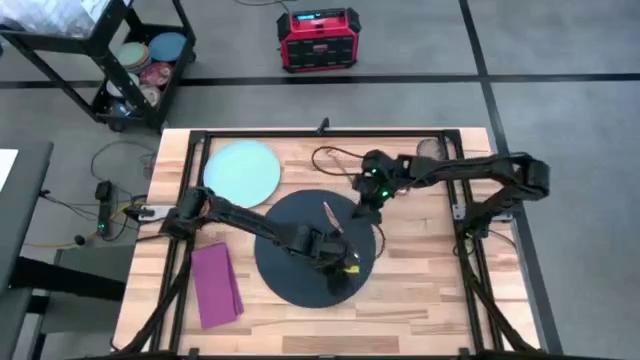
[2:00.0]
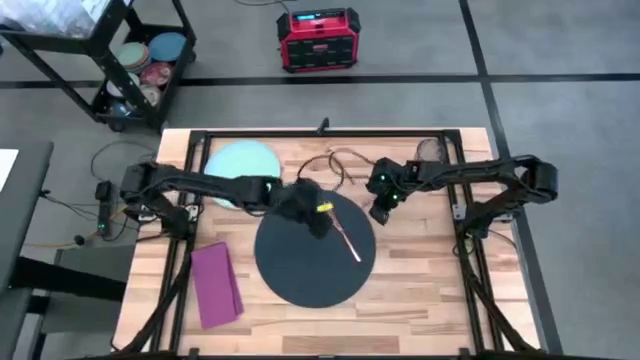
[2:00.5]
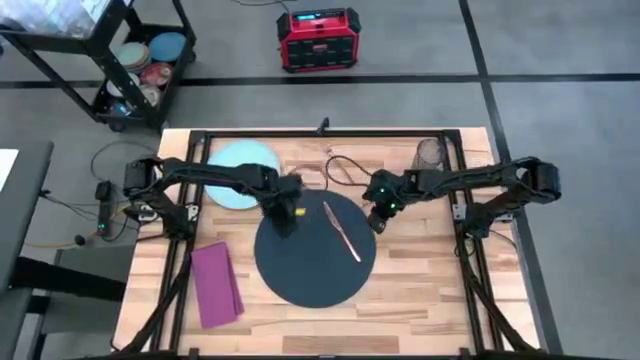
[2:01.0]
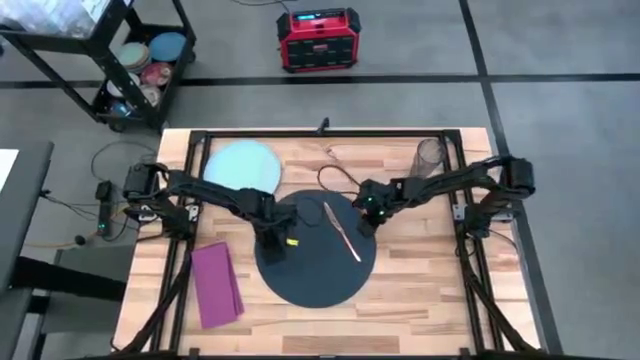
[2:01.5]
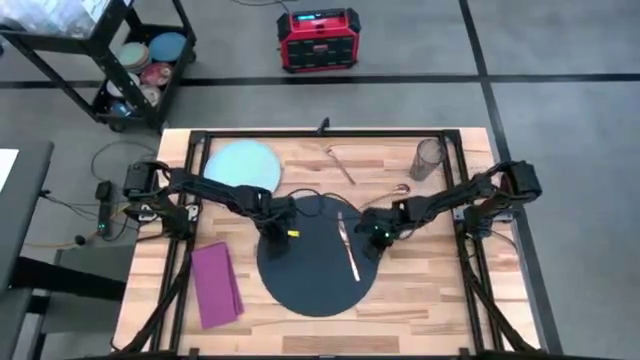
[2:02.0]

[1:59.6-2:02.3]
Task: Set table place
Adjust the blue table mat on the table

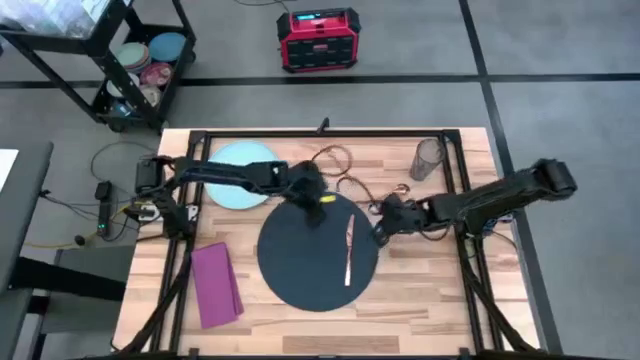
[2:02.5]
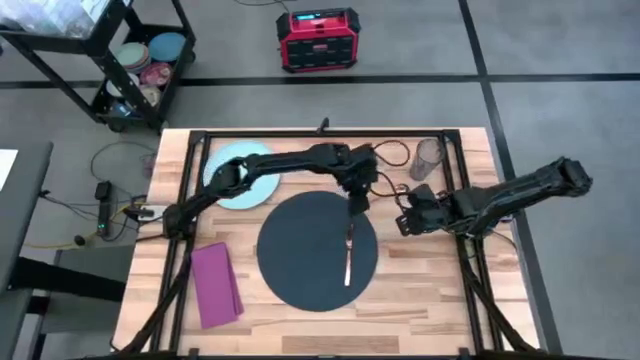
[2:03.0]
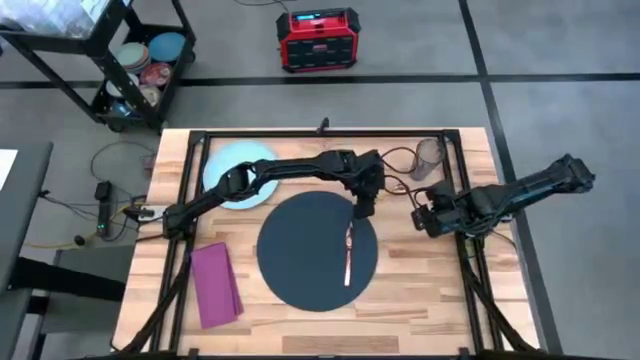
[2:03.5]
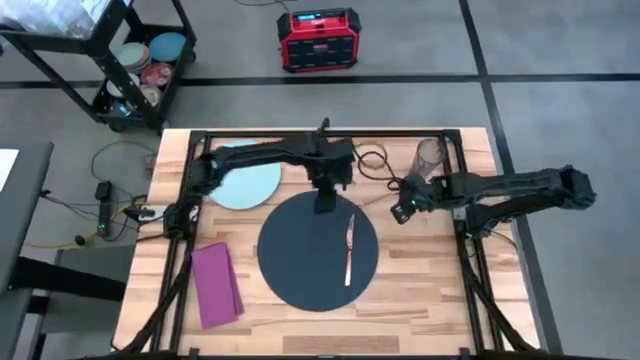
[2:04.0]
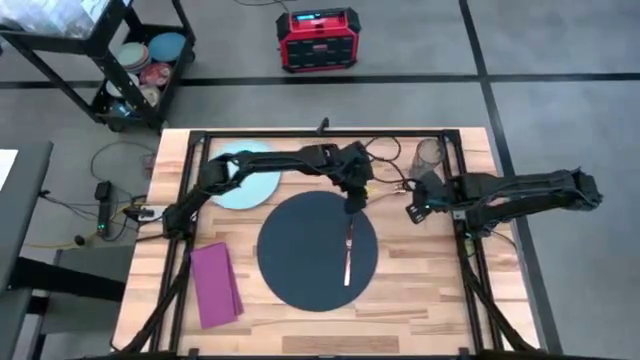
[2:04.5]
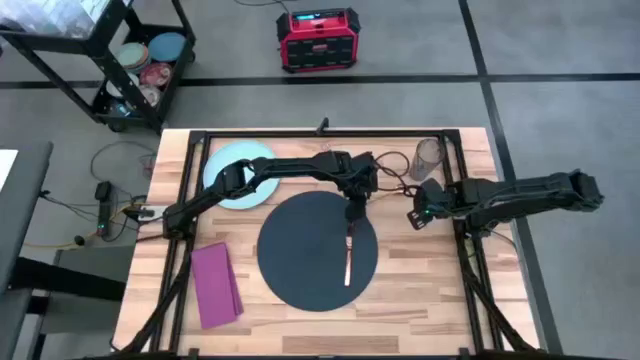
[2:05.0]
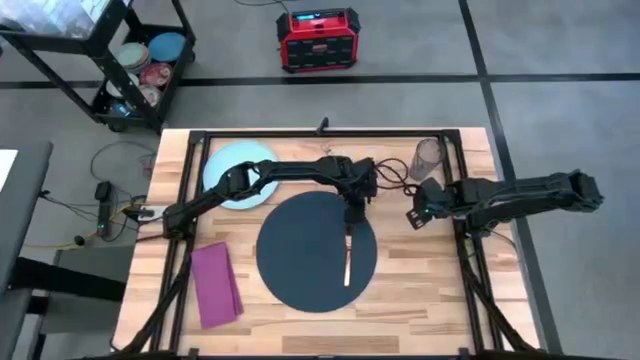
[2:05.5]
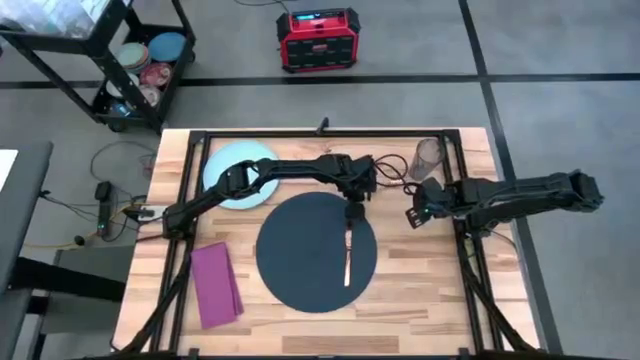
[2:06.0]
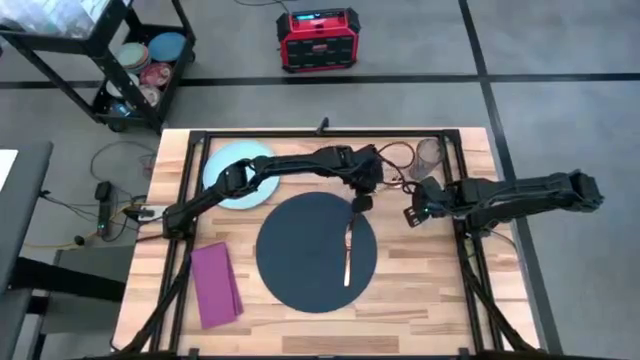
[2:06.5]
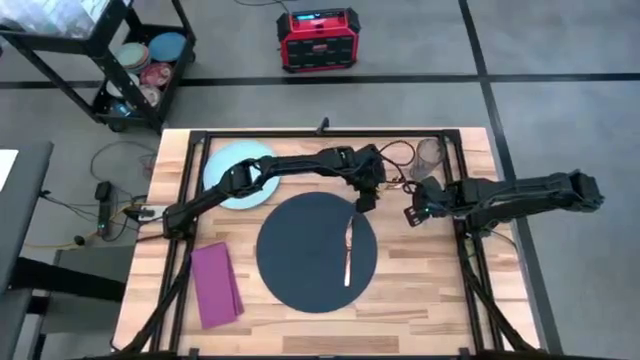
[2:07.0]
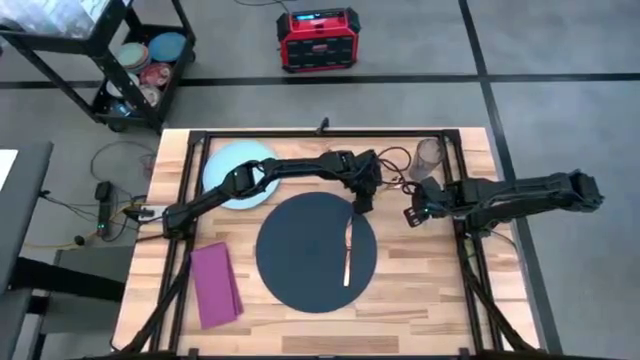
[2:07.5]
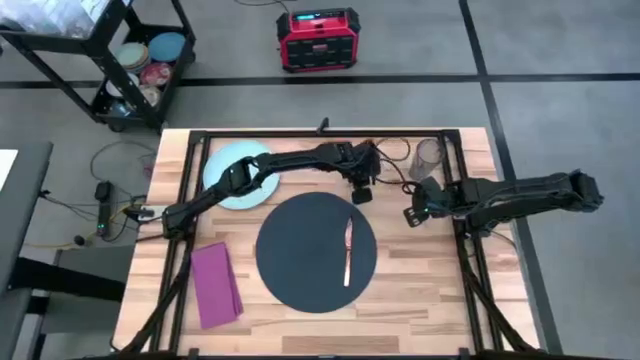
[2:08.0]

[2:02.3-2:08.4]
Put the brown table spoon on the blue table mat to the right of the brown table knife

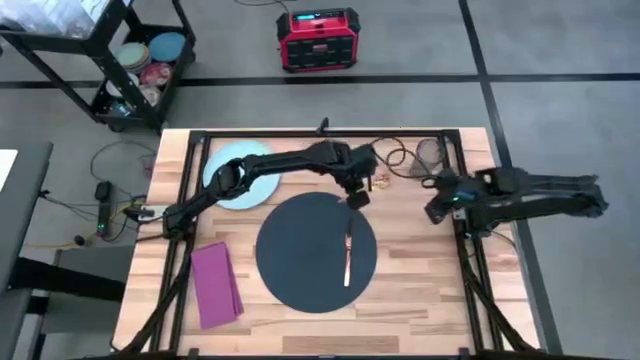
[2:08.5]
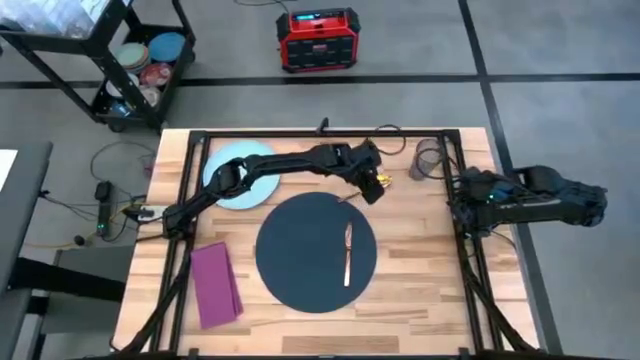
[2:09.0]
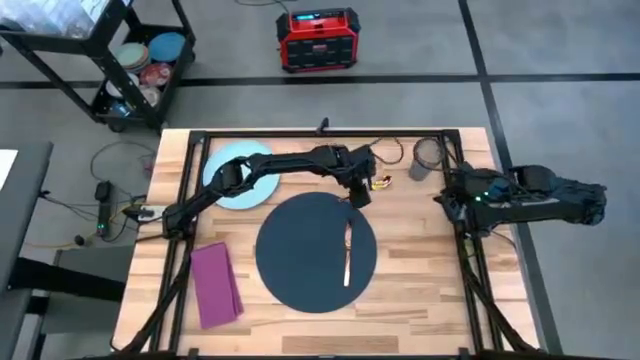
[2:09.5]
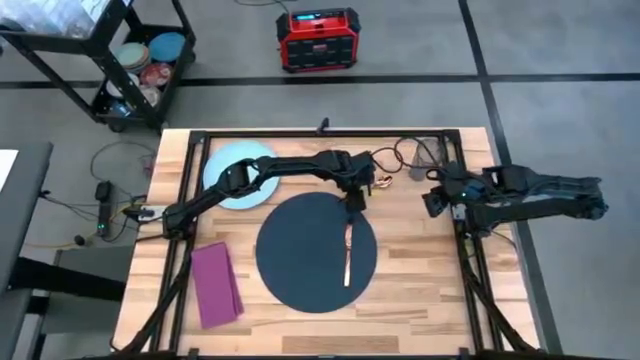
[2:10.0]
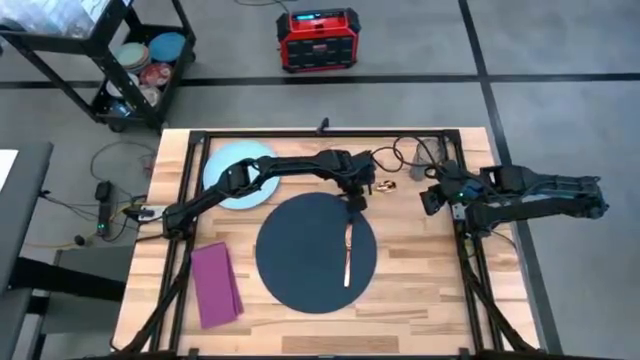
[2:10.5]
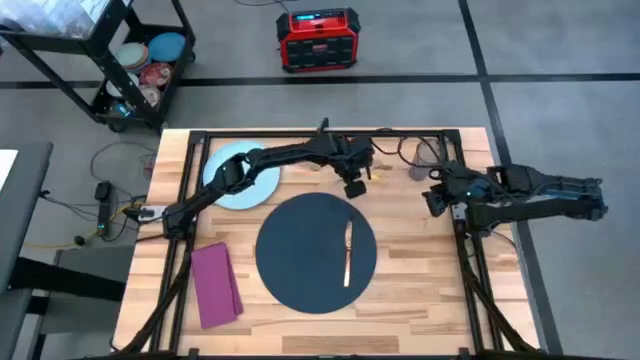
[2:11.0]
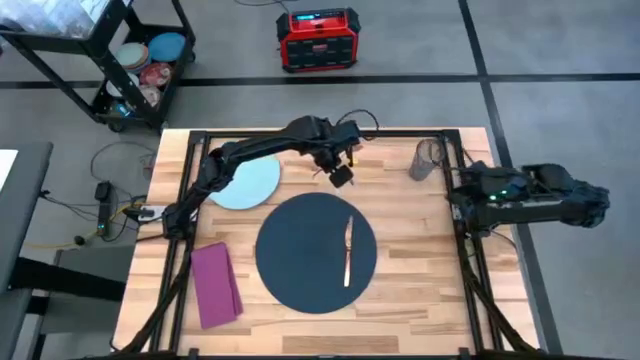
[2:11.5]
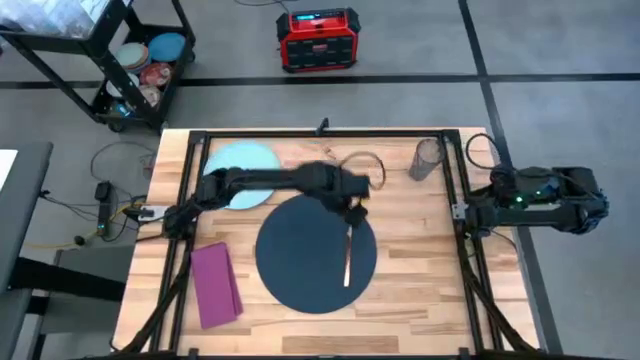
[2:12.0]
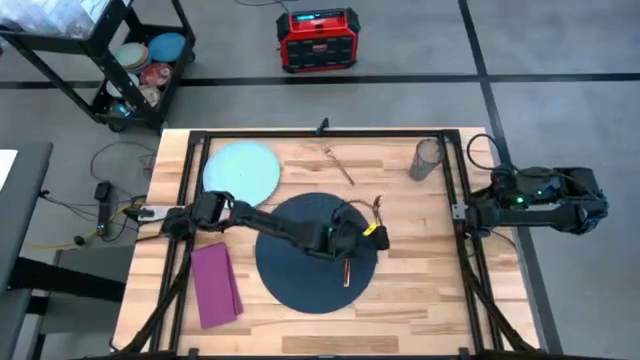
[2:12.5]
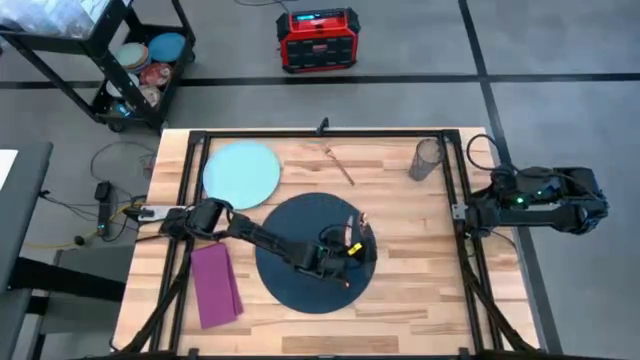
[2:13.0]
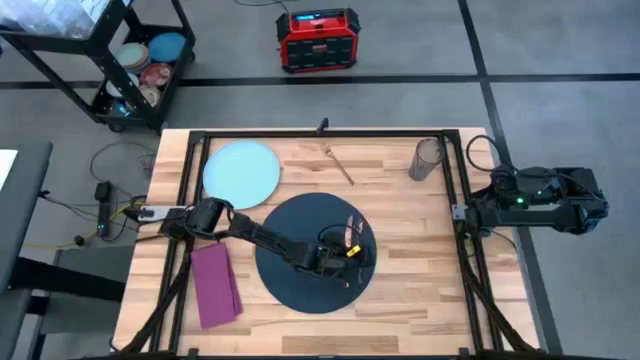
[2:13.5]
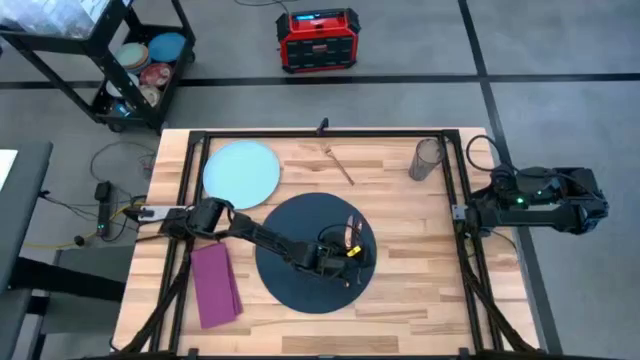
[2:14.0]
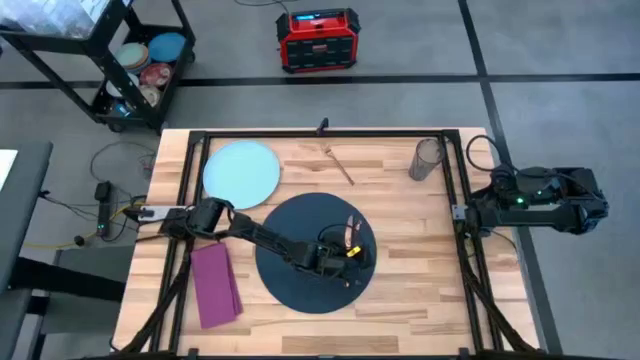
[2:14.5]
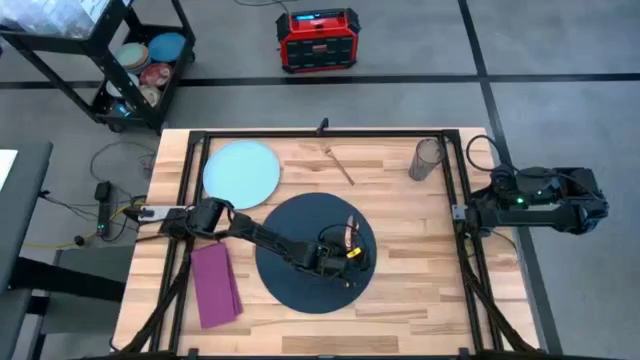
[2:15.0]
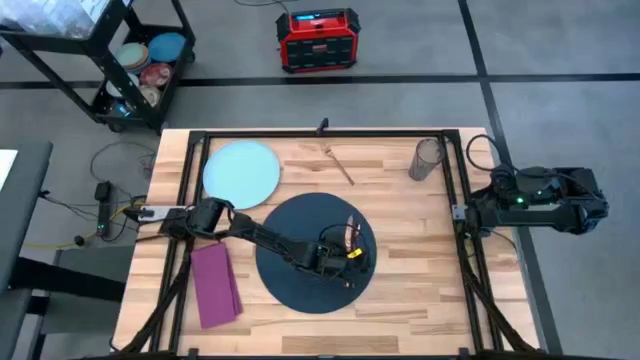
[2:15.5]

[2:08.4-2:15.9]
Put the brown table spoon on the blue table mat to the right of the brown table knife

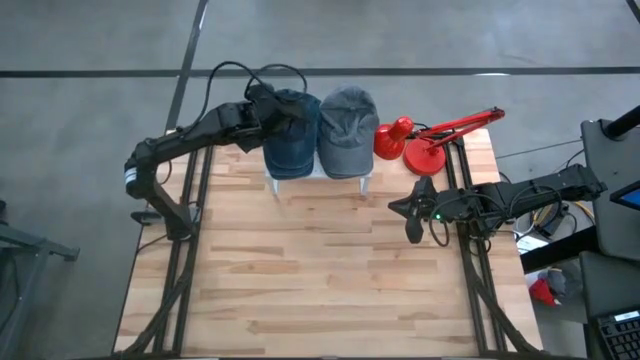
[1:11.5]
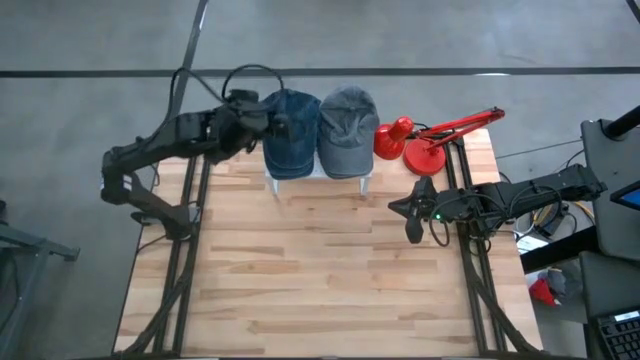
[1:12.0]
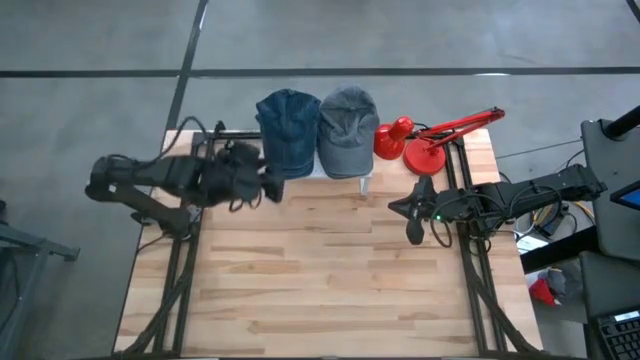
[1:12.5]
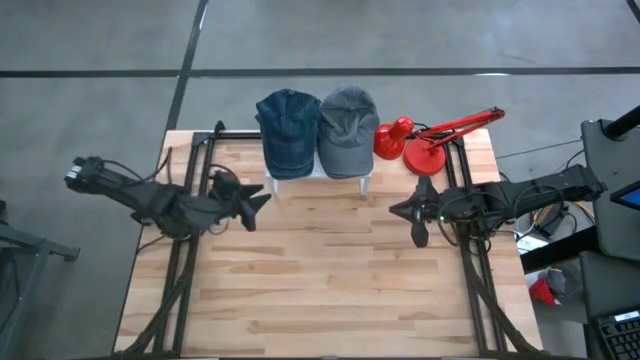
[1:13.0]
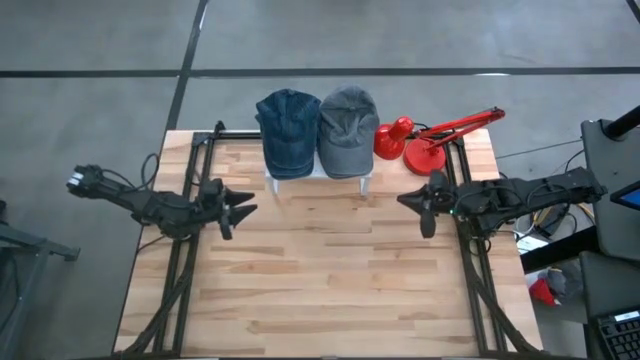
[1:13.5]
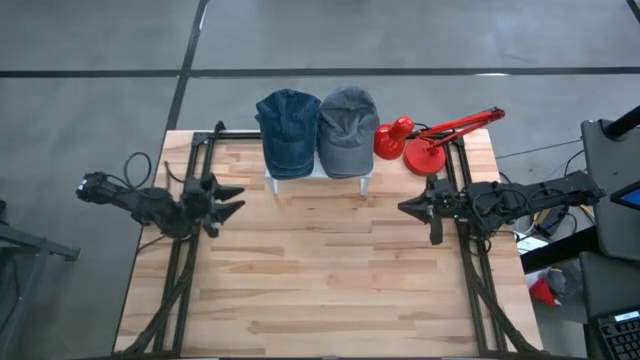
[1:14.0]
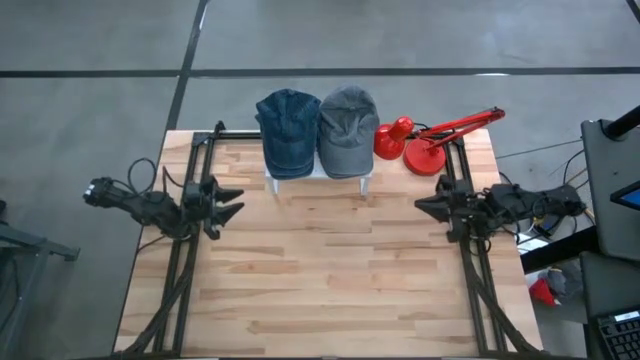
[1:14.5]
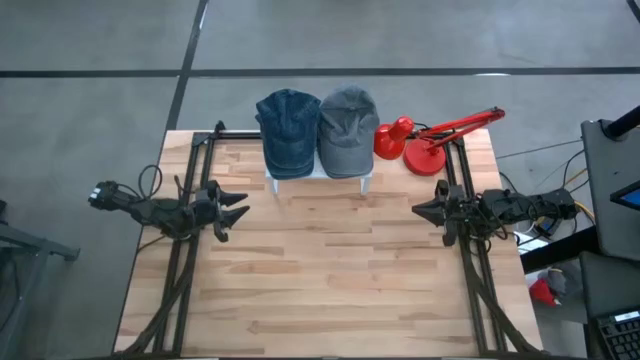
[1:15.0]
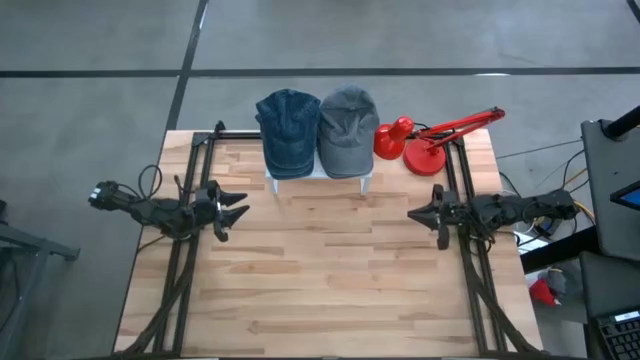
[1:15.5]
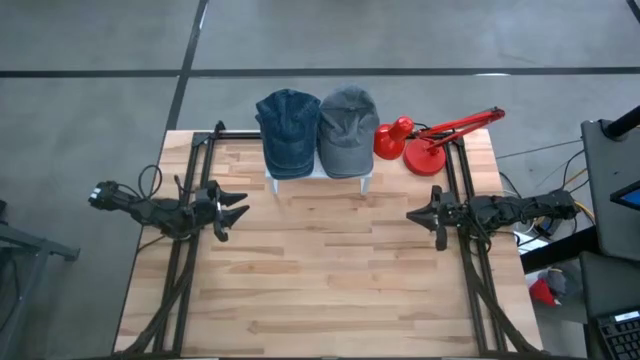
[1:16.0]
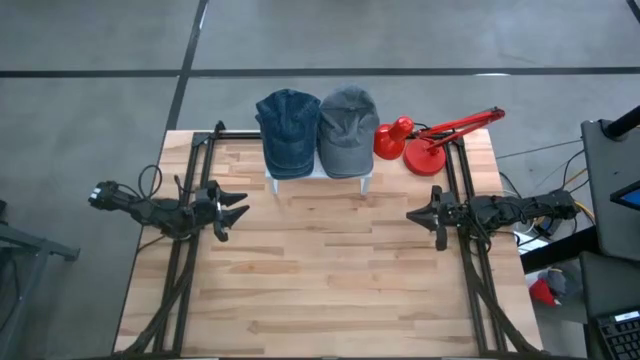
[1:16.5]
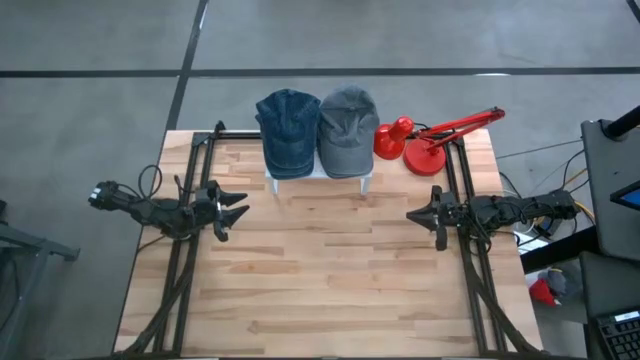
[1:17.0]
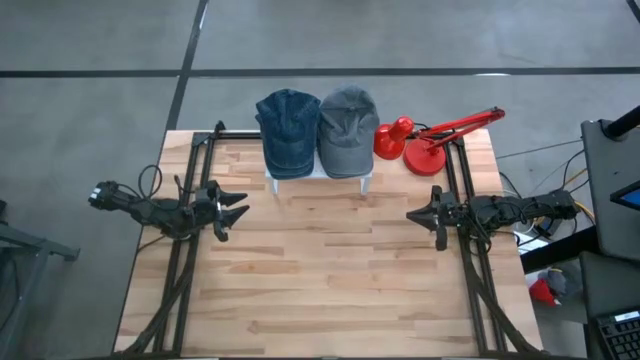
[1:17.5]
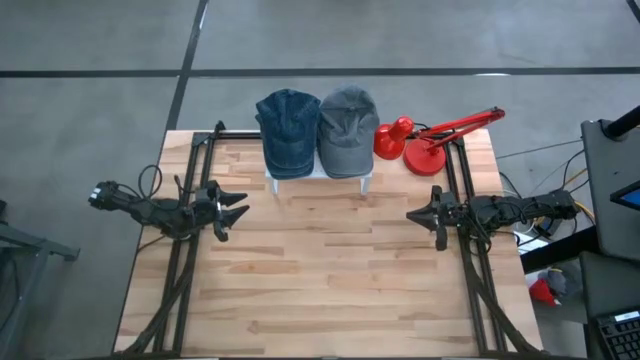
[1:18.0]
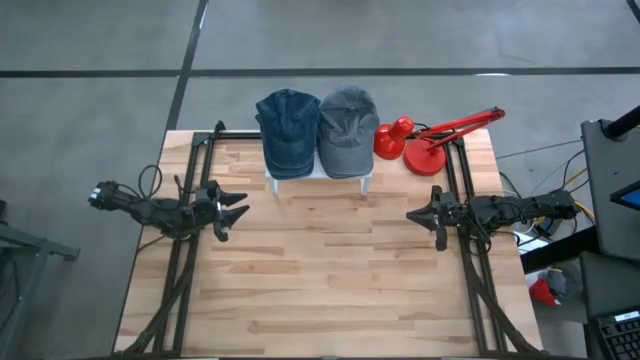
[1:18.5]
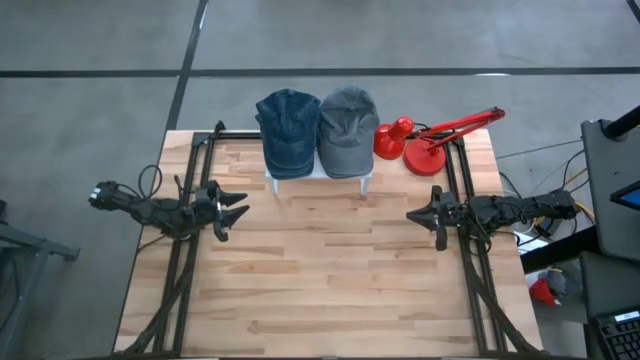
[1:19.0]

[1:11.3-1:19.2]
Task: Pick & Place hat
Return to Home Position
